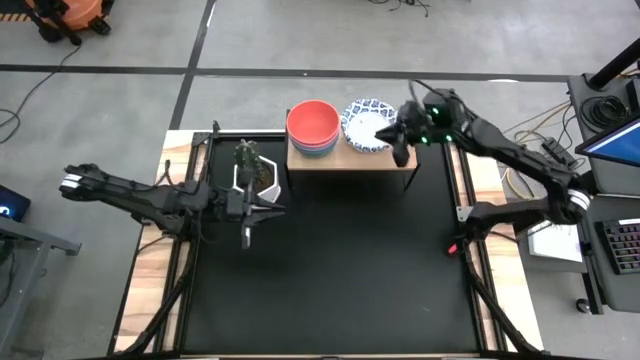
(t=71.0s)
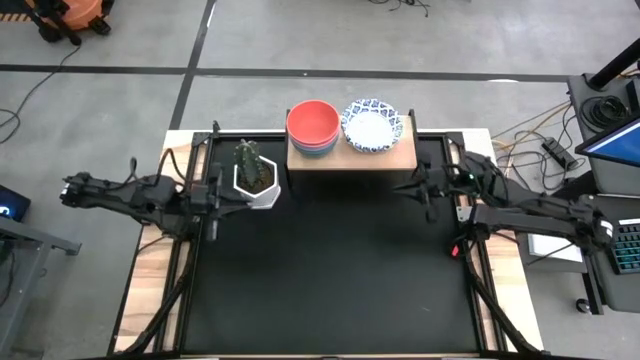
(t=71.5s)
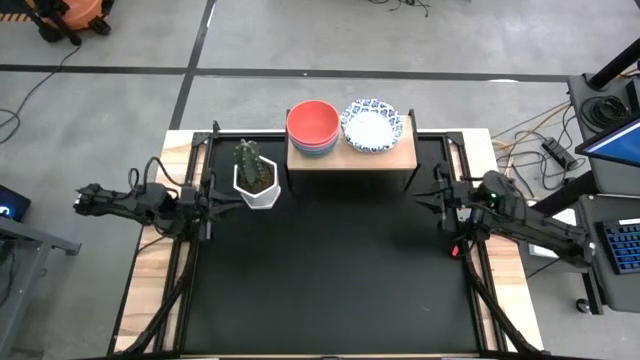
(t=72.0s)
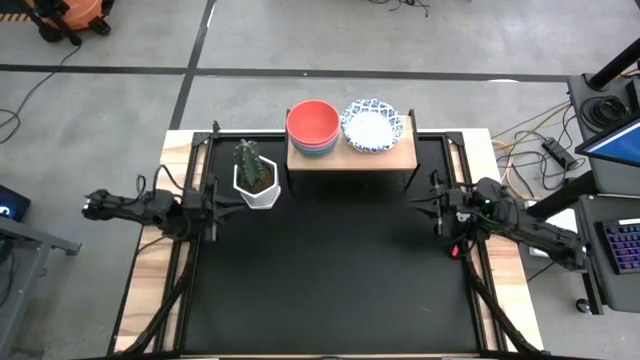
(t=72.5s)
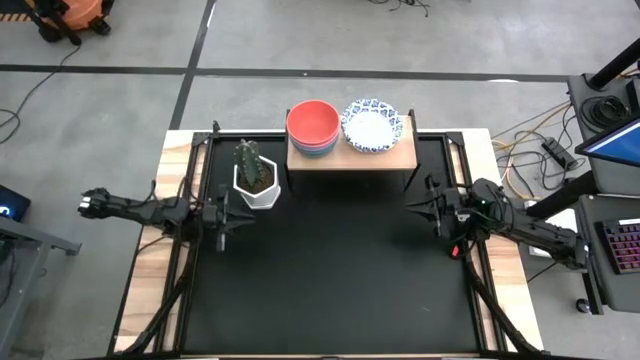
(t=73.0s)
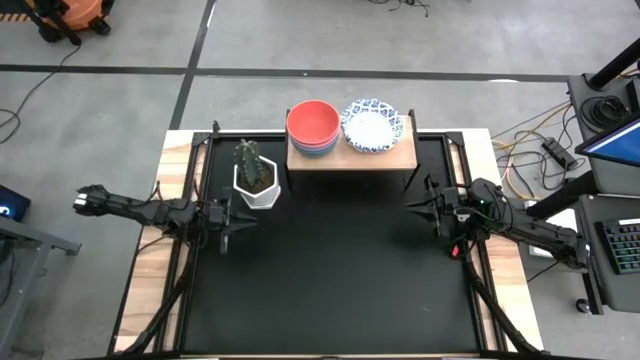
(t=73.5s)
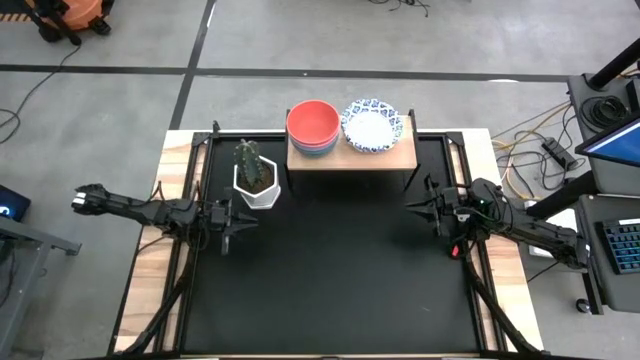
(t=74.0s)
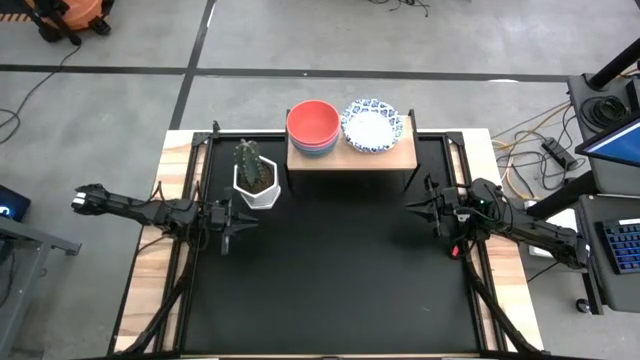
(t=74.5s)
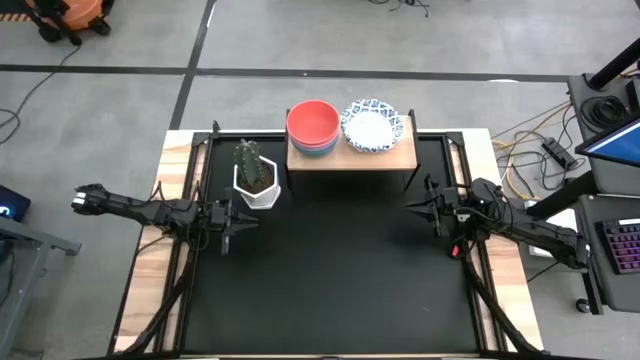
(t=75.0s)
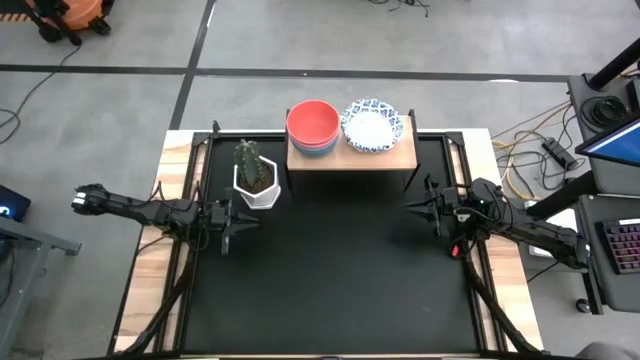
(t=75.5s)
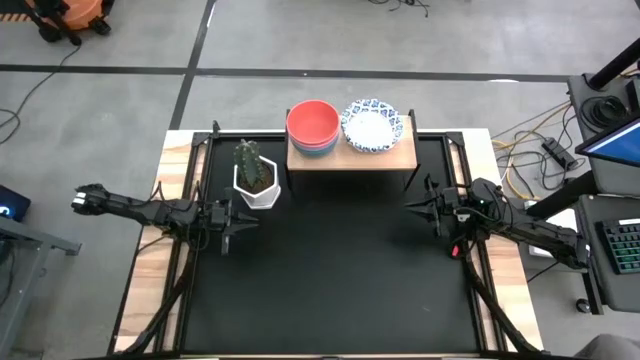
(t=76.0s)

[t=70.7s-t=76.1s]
Task: Place and stack bowls onto a shelf
Return to Home Position

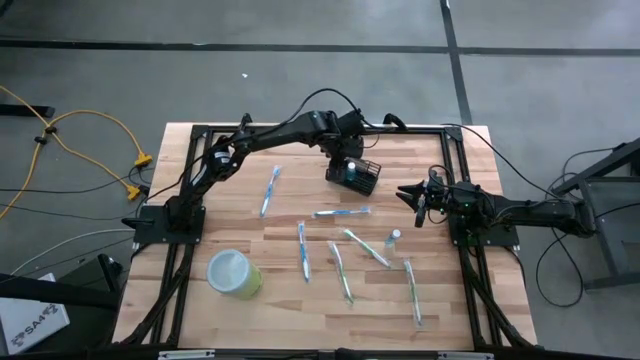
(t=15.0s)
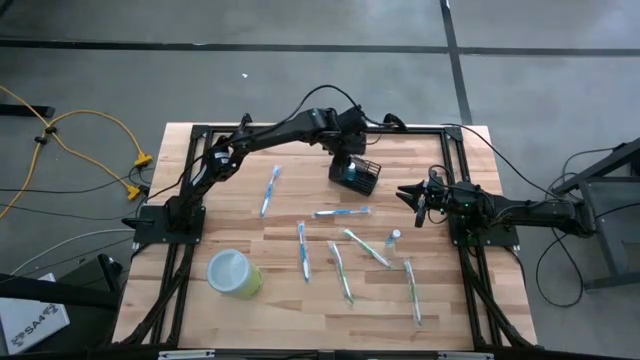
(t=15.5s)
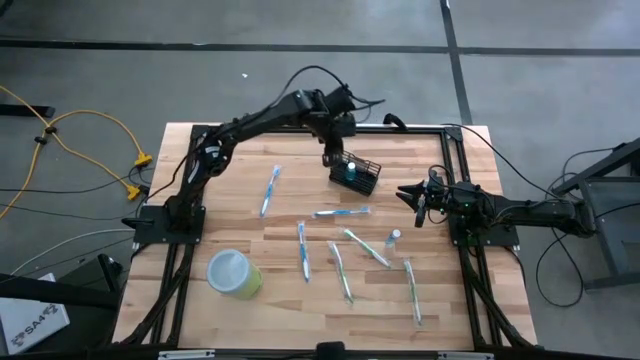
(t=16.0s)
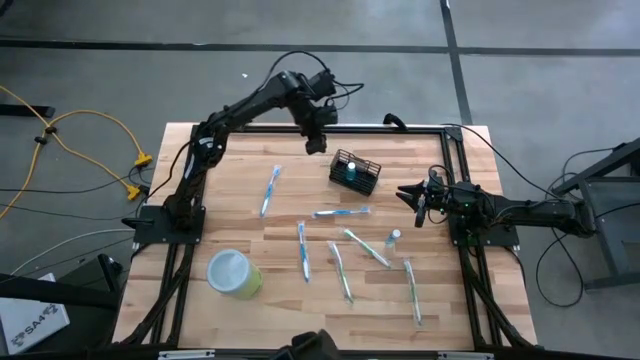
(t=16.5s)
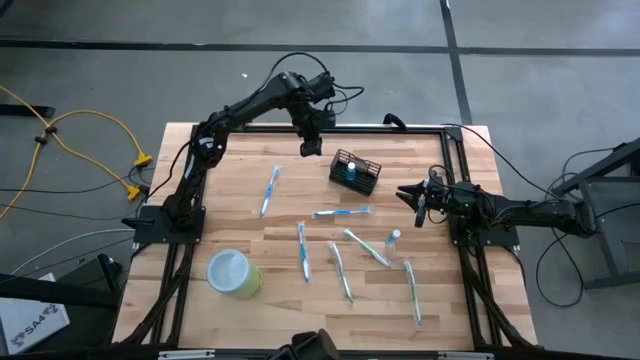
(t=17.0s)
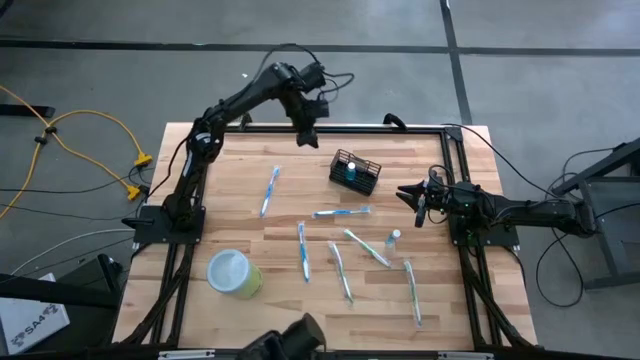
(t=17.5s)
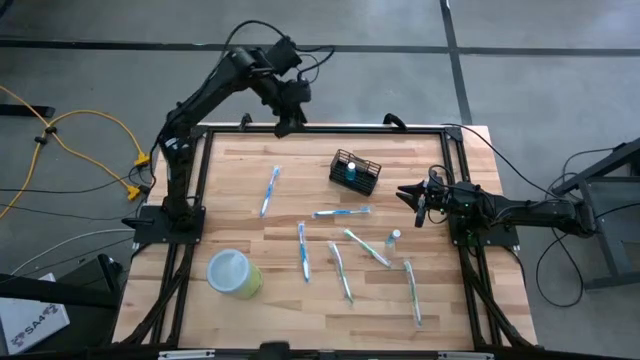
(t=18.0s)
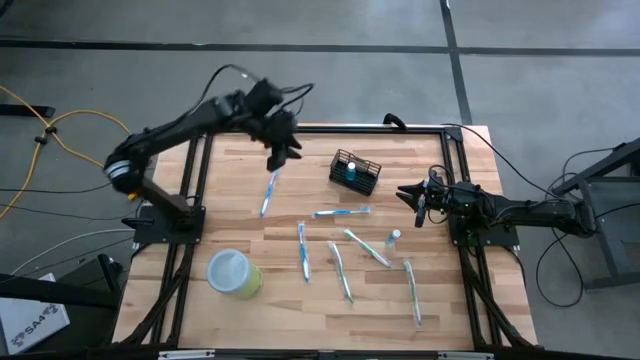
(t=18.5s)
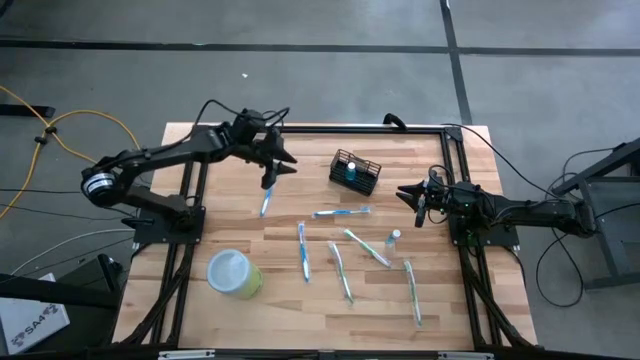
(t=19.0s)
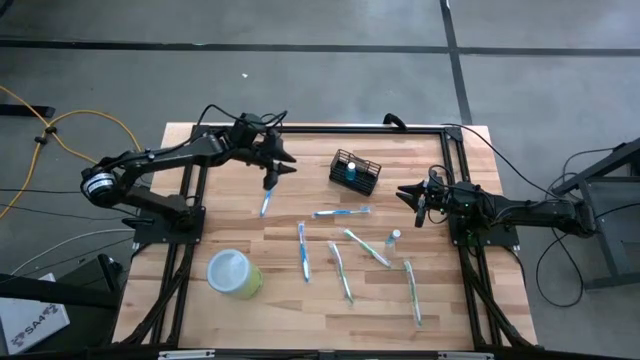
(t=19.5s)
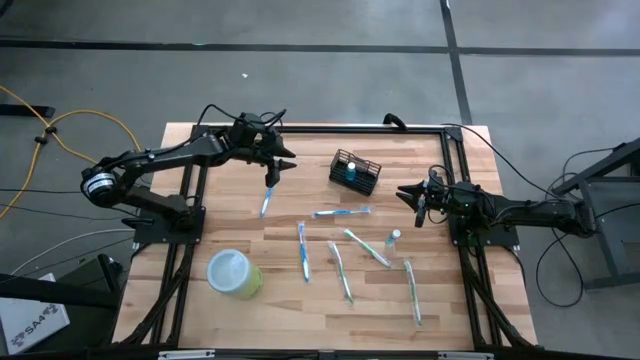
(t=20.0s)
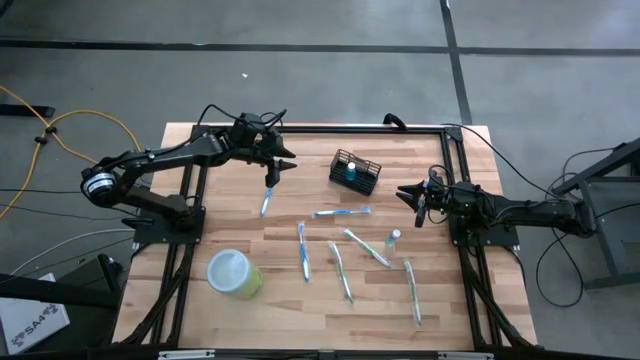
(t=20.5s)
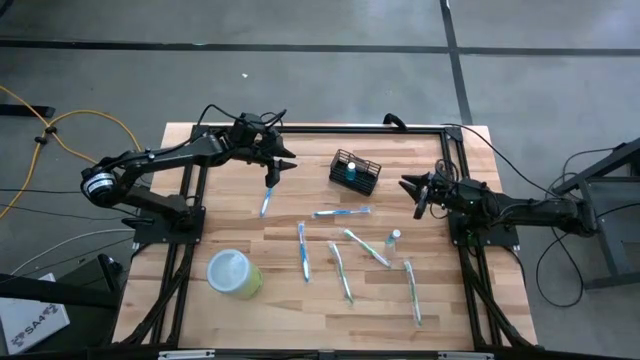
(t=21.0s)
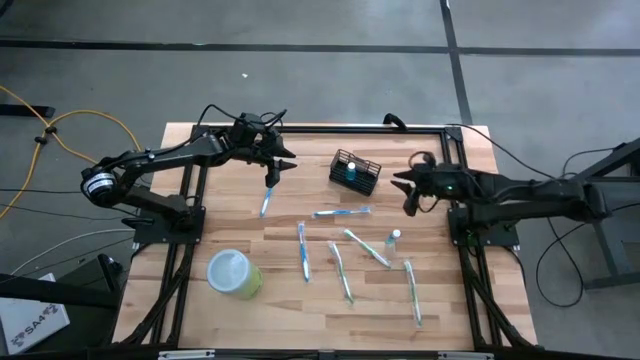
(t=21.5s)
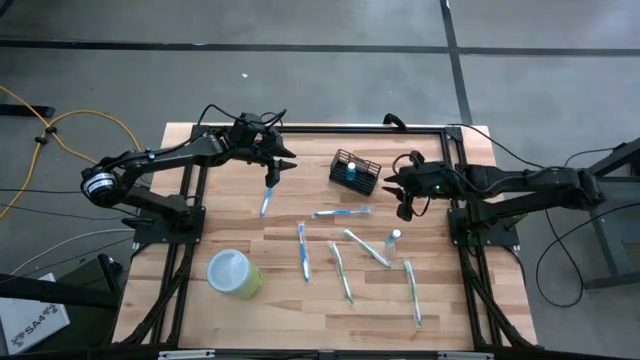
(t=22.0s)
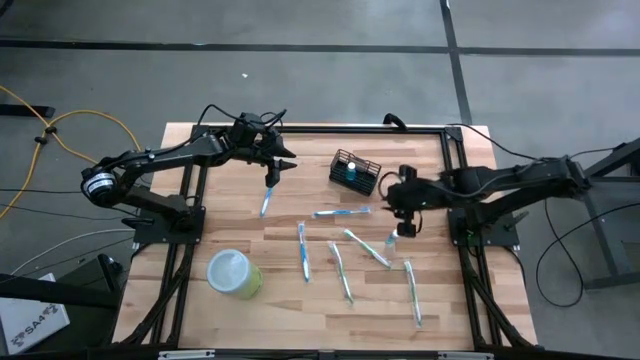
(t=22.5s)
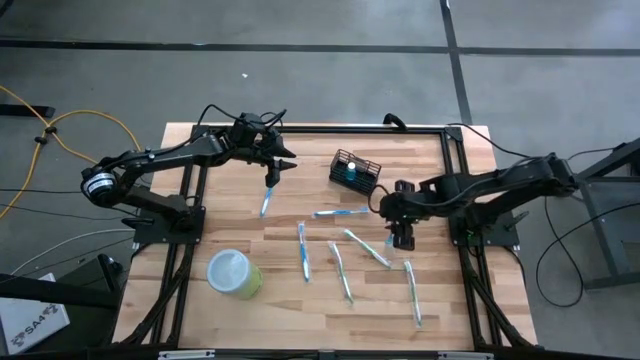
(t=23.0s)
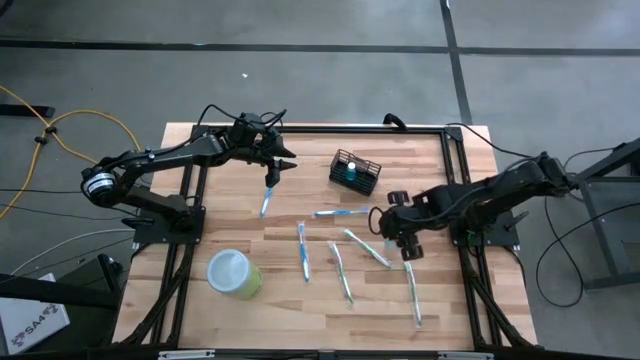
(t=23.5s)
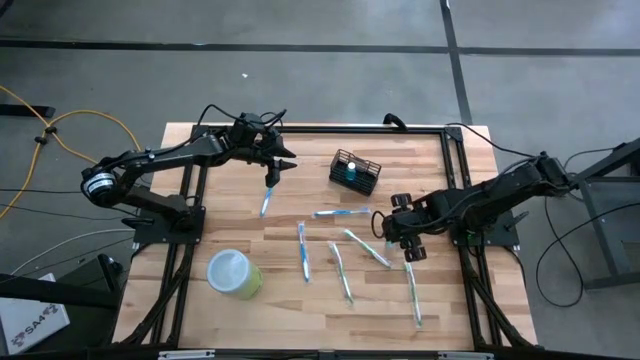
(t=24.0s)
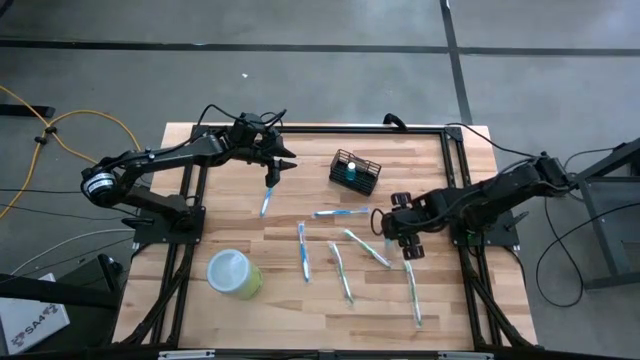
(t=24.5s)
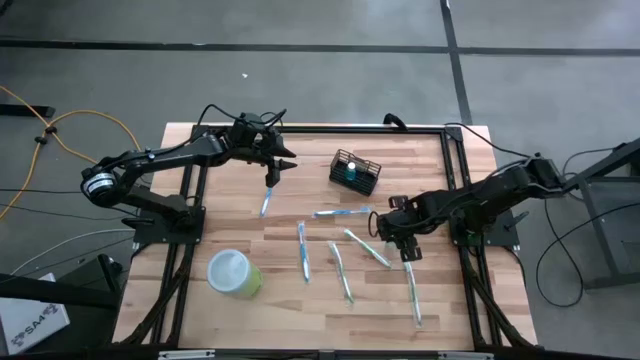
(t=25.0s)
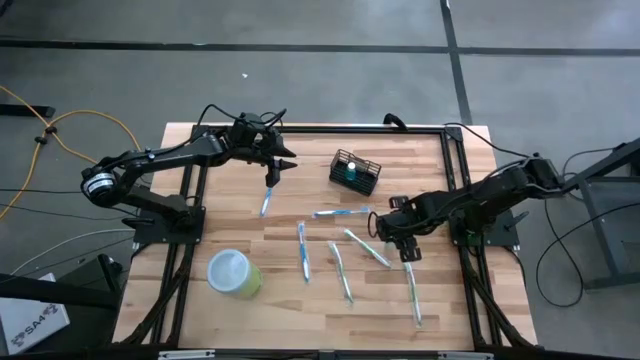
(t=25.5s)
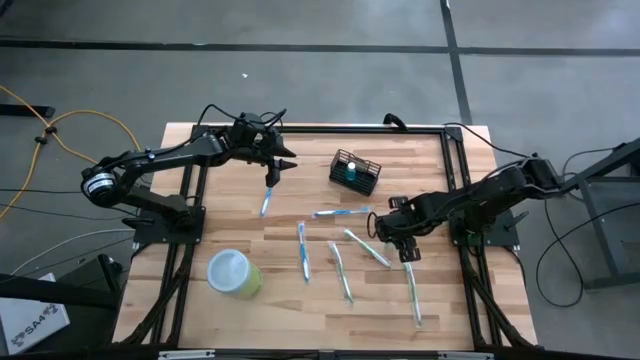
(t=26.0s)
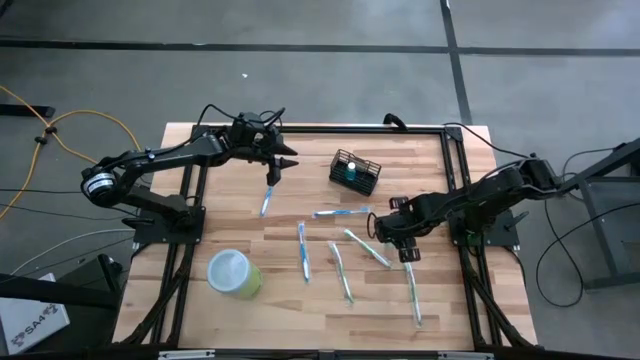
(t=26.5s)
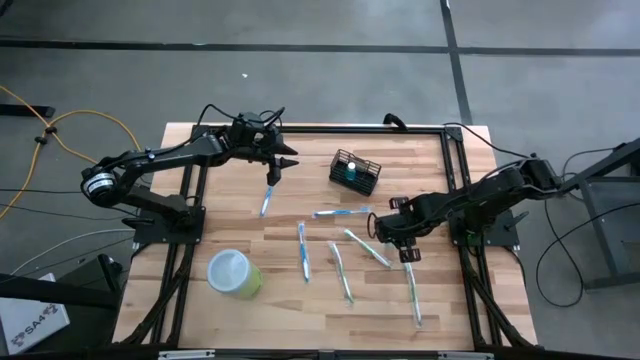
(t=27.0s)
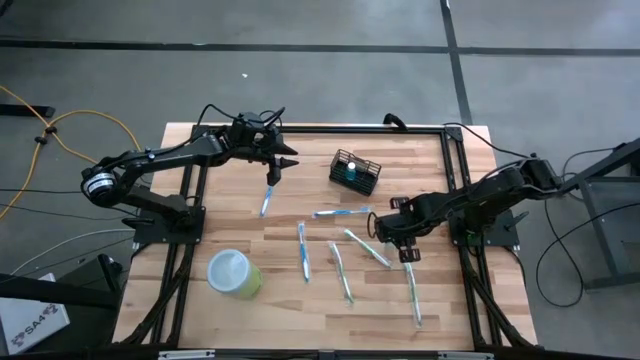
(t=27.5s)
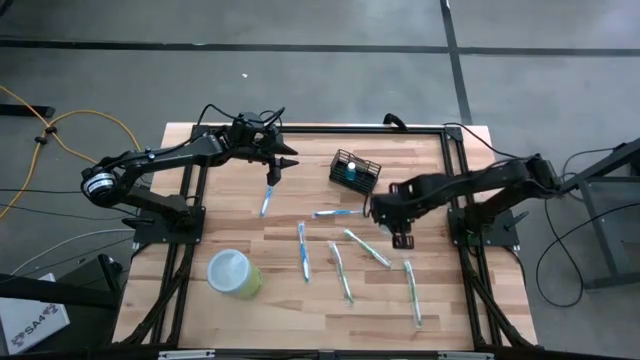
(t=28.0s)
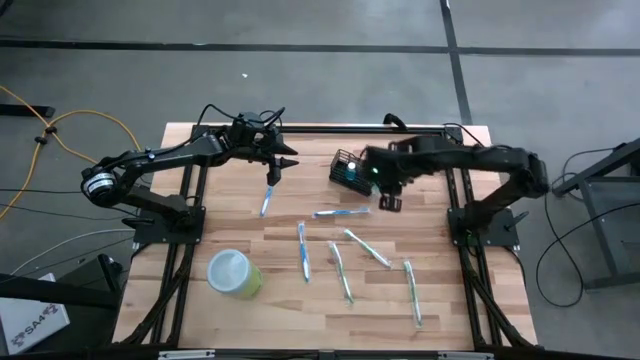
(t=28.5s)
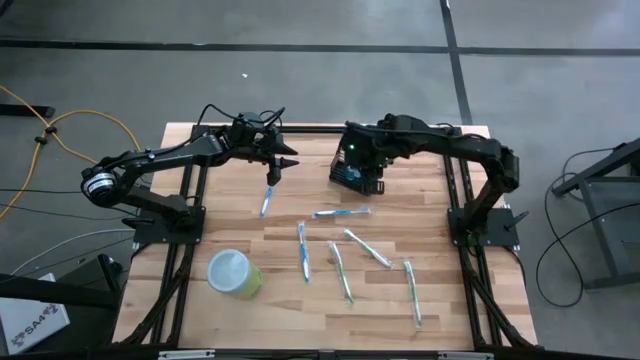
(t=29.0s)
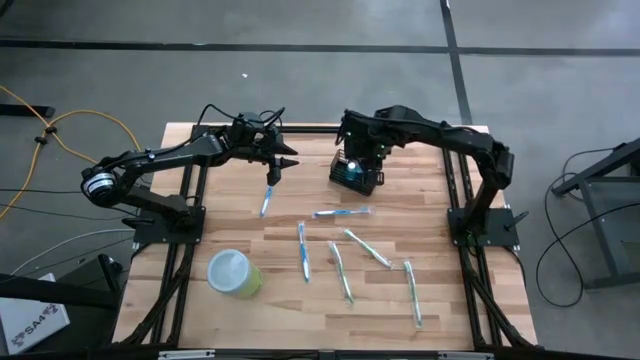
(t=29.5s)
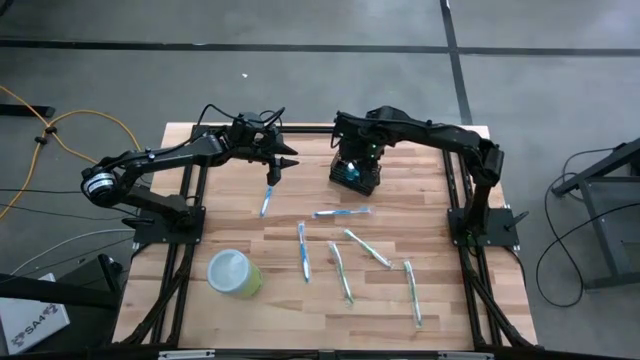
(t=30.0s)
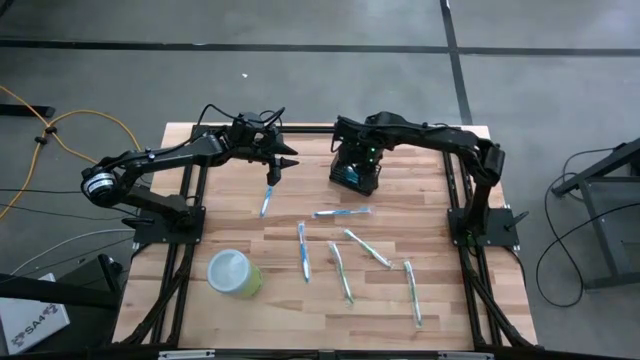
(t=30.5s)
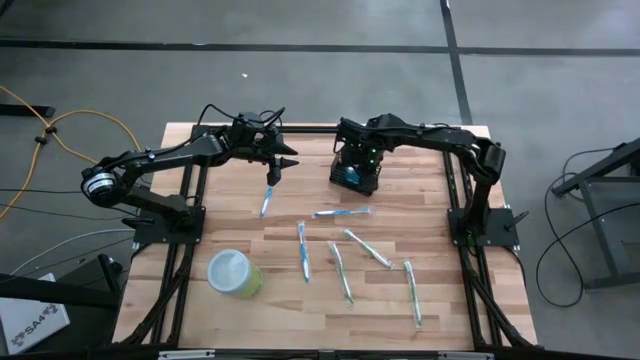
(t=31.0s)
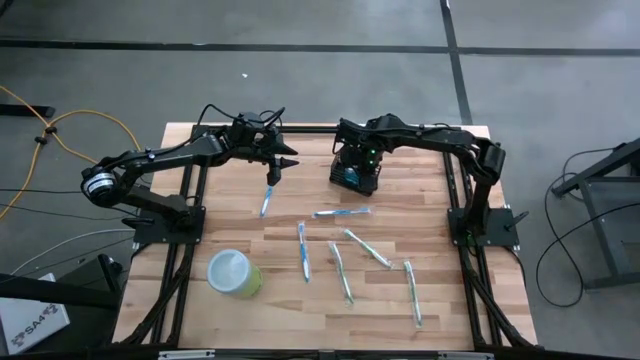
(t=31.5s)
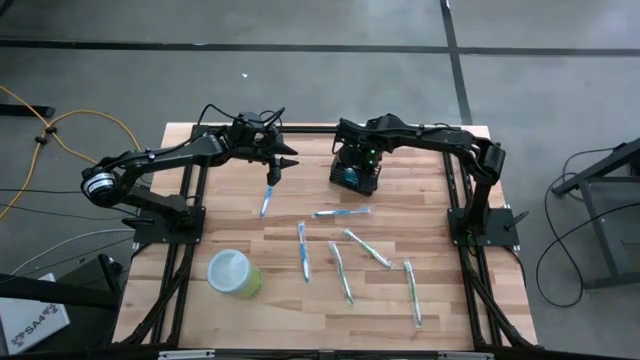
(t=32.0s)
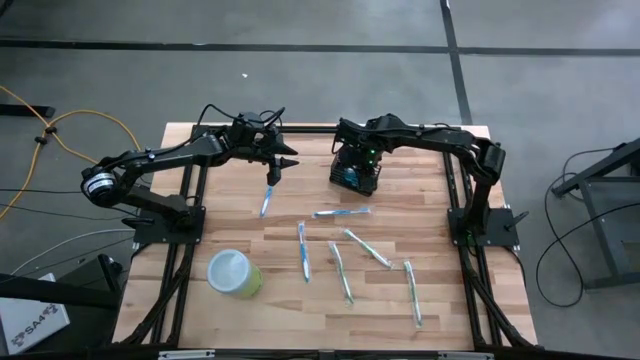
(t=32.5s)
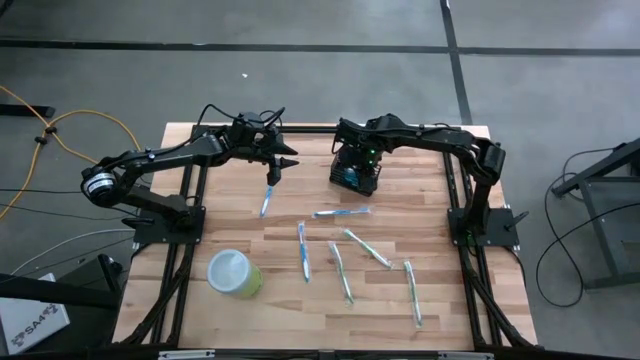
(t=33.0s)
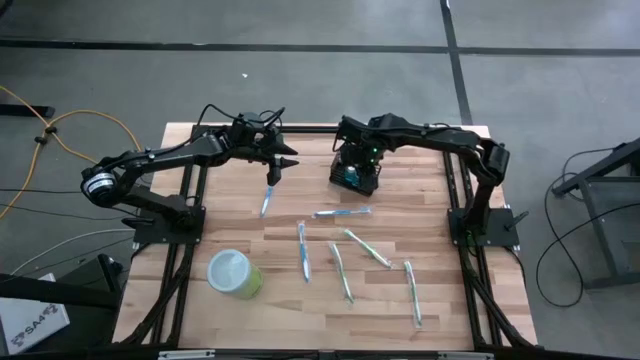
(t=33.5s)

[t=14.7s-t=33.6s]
Task: Pick & Place toothbrushing station
Put the blue mouthwash into the middle section of the black mesh organizer
